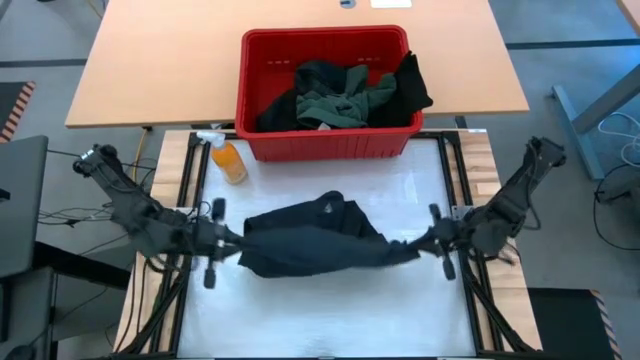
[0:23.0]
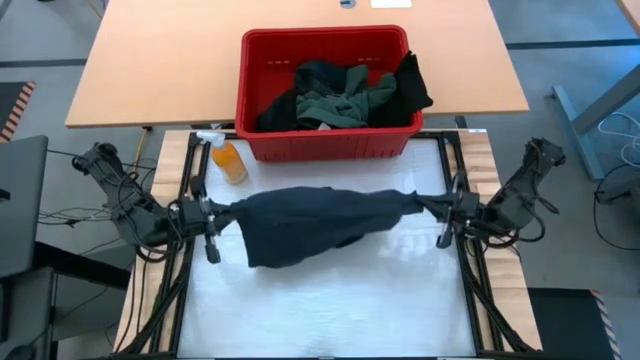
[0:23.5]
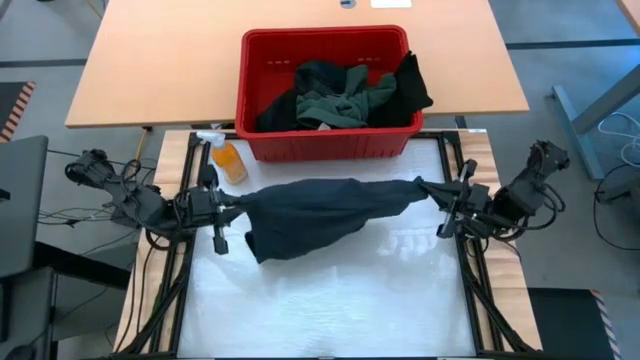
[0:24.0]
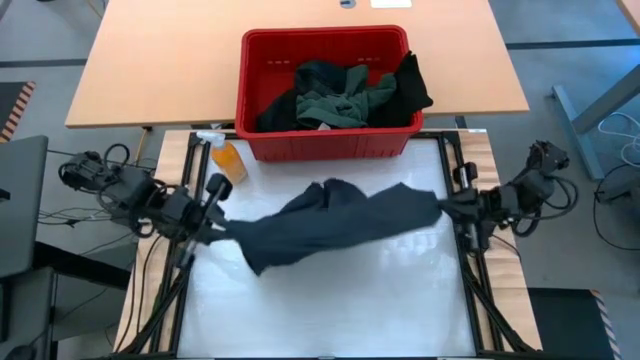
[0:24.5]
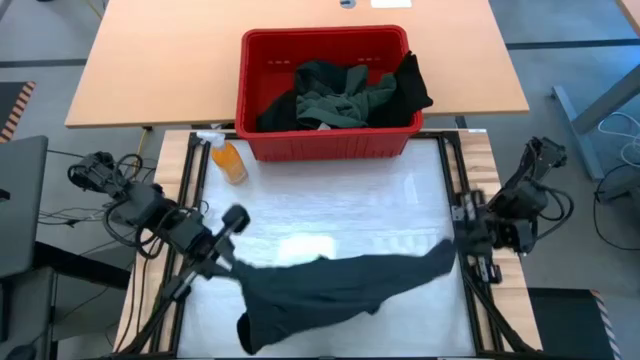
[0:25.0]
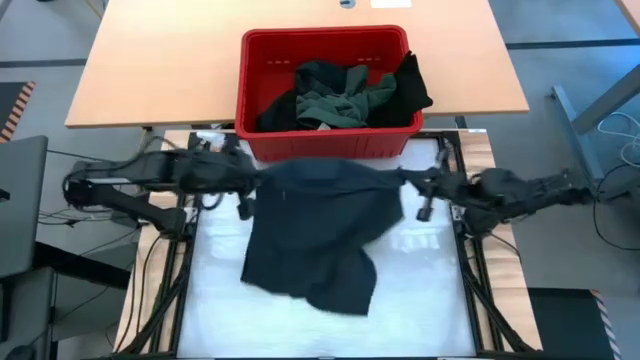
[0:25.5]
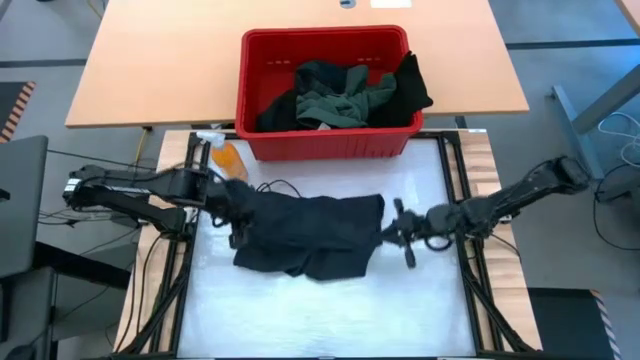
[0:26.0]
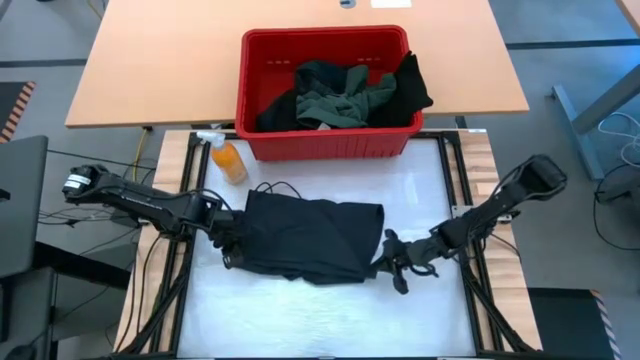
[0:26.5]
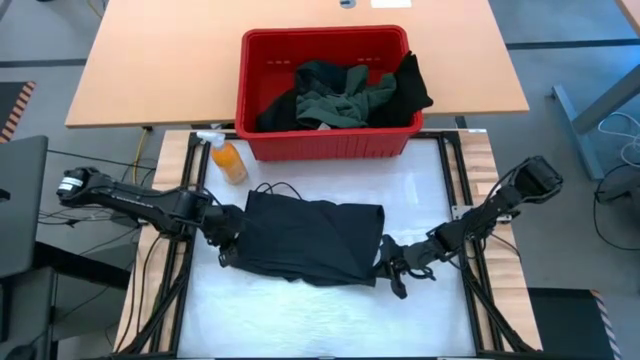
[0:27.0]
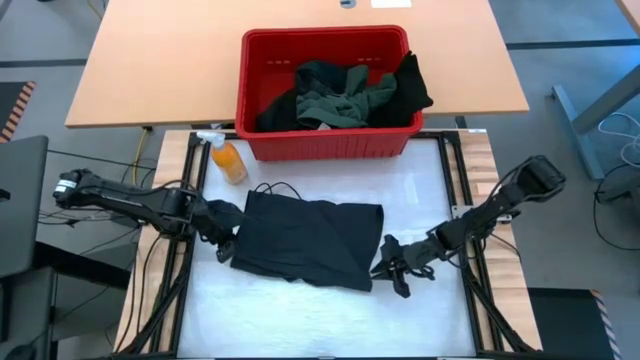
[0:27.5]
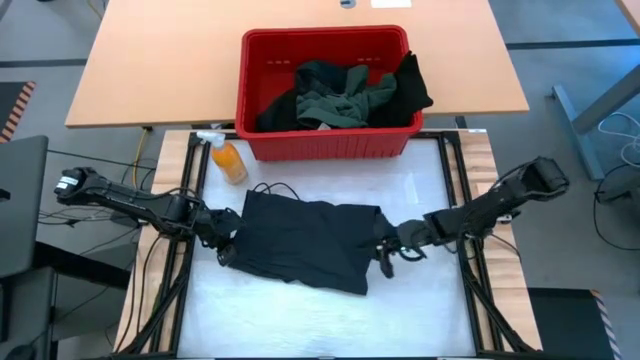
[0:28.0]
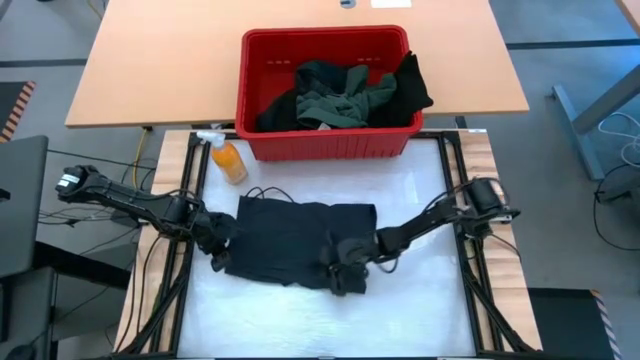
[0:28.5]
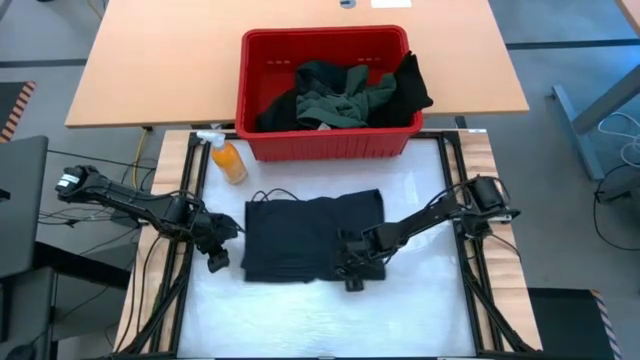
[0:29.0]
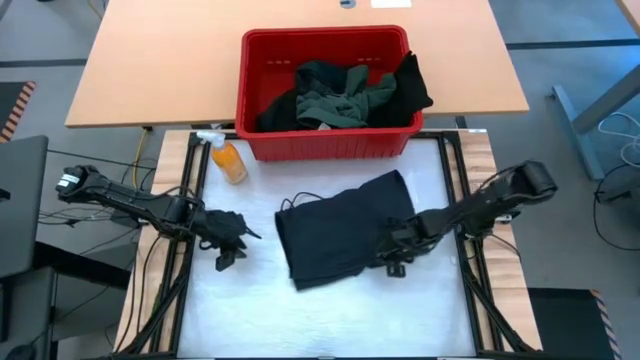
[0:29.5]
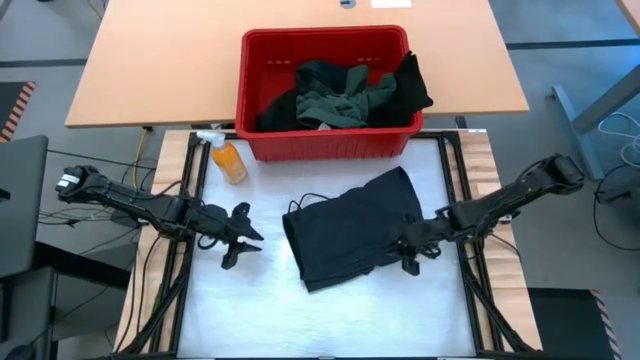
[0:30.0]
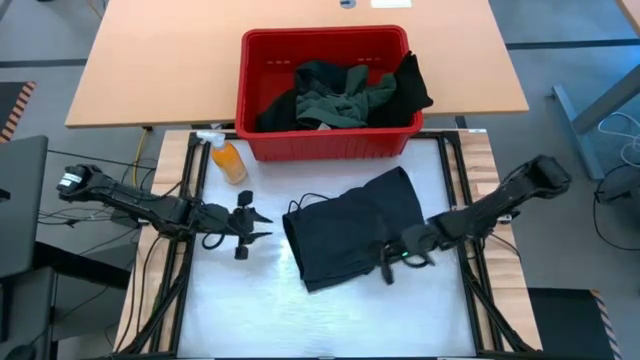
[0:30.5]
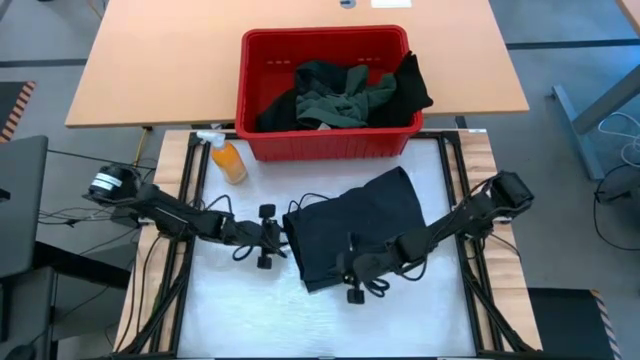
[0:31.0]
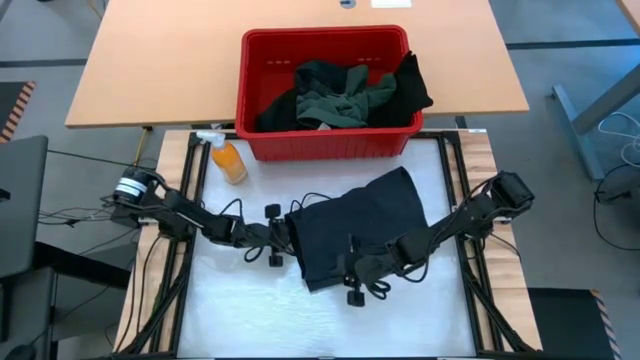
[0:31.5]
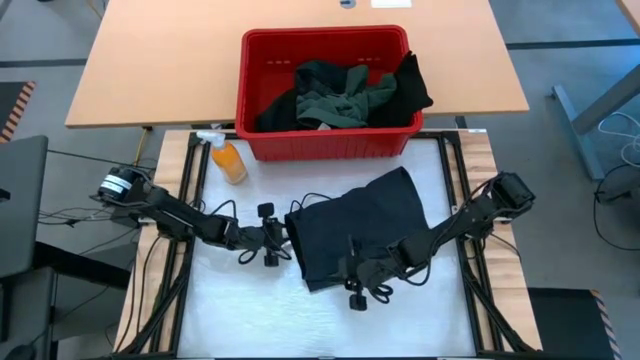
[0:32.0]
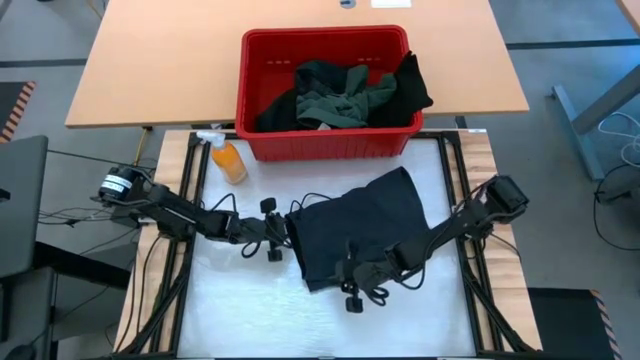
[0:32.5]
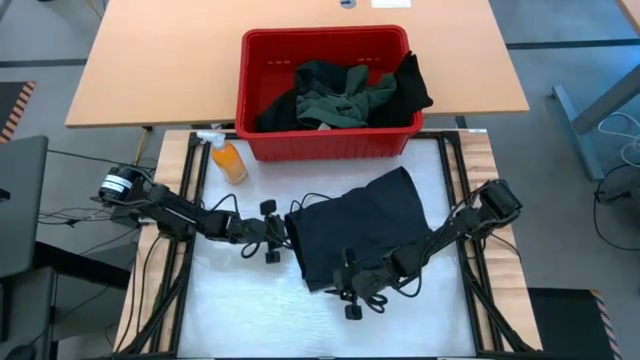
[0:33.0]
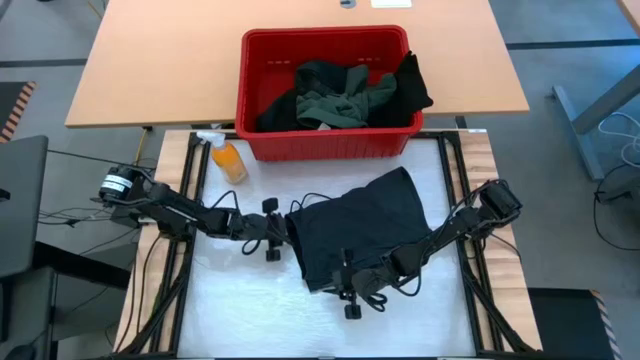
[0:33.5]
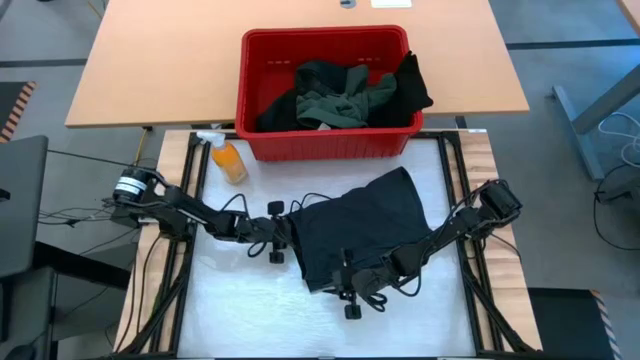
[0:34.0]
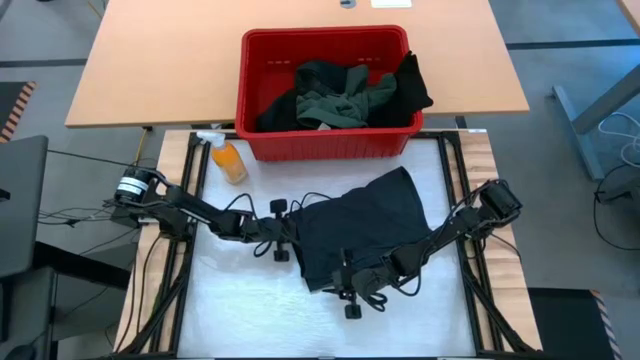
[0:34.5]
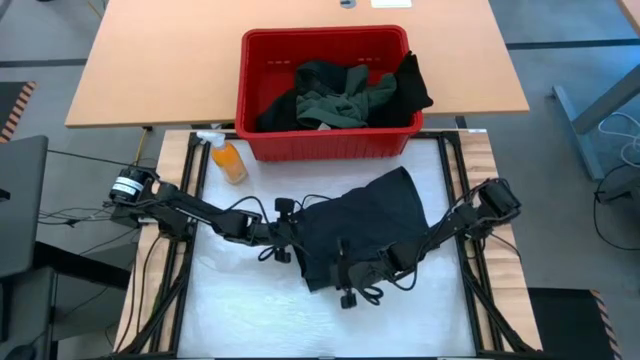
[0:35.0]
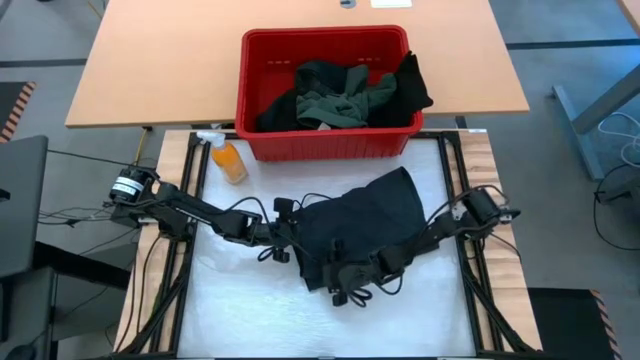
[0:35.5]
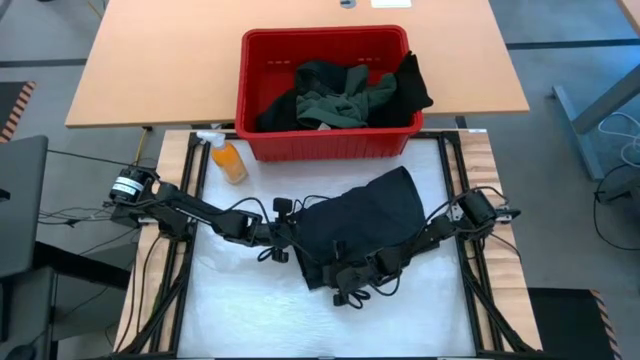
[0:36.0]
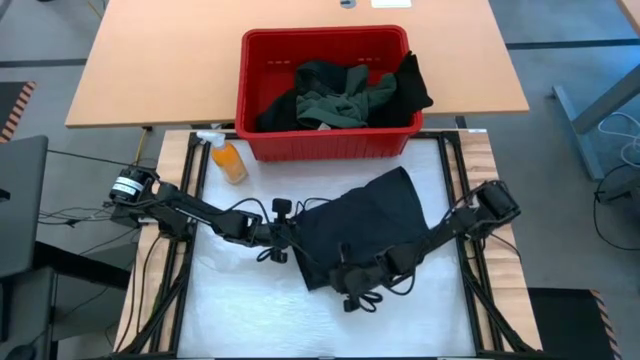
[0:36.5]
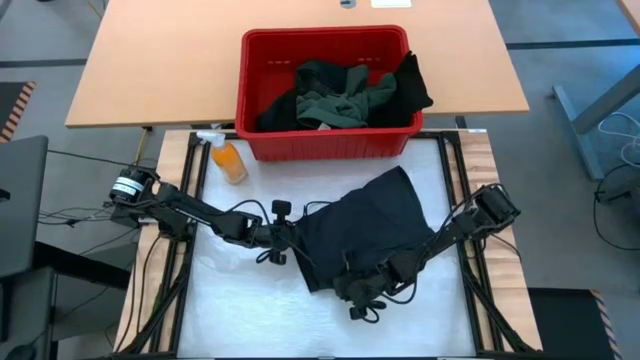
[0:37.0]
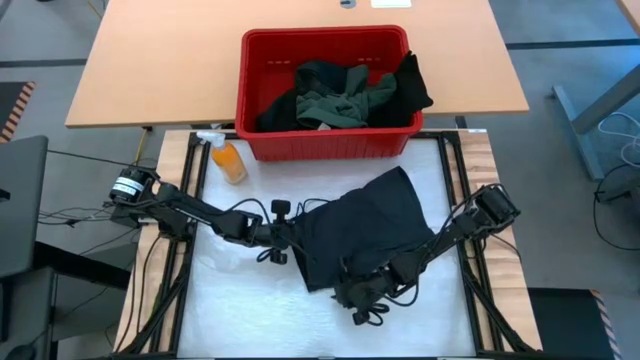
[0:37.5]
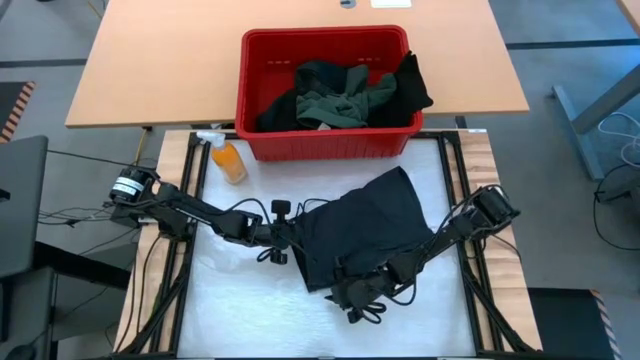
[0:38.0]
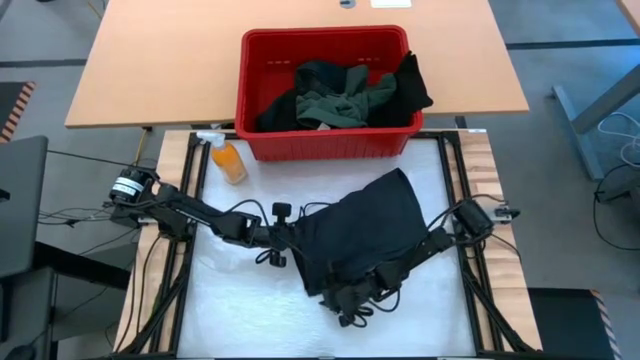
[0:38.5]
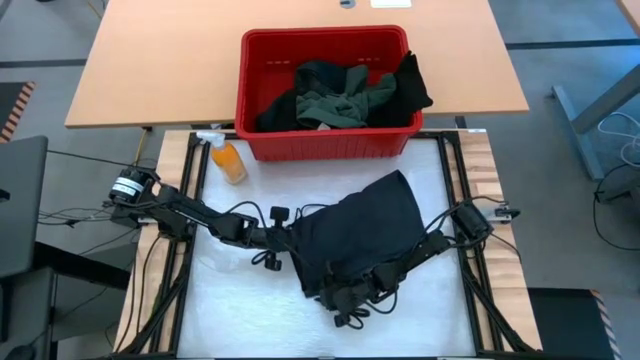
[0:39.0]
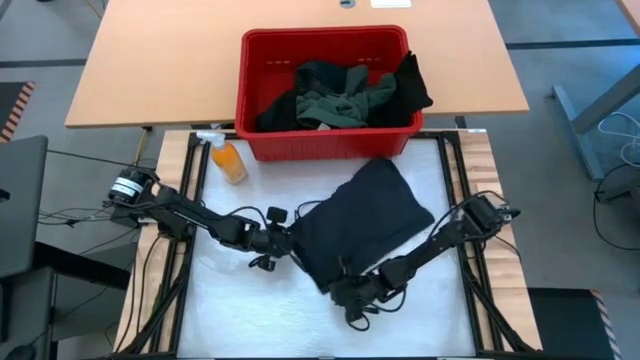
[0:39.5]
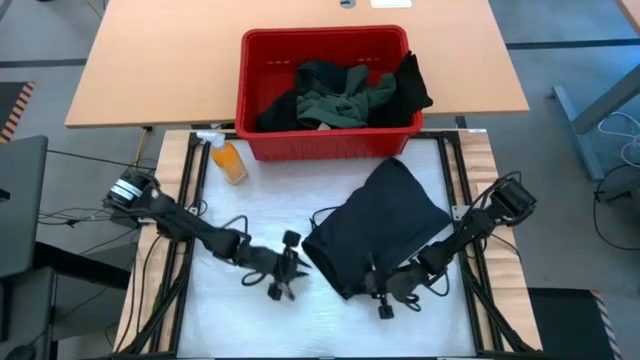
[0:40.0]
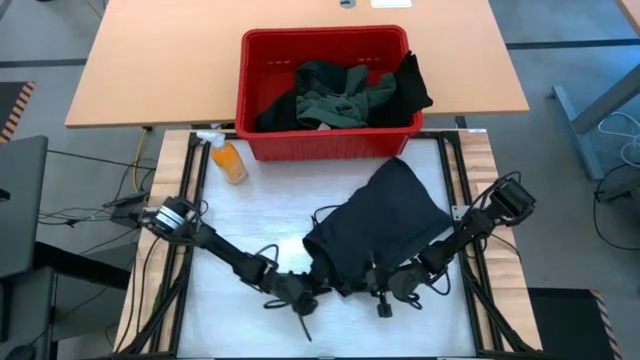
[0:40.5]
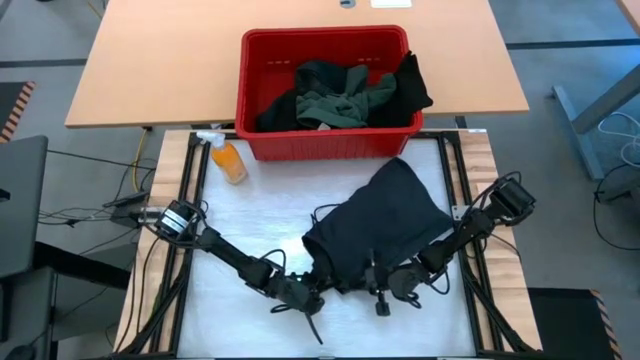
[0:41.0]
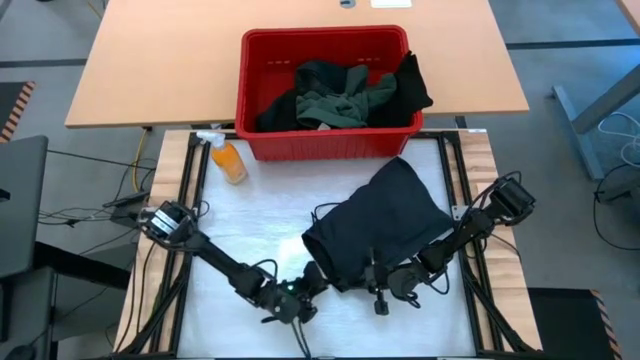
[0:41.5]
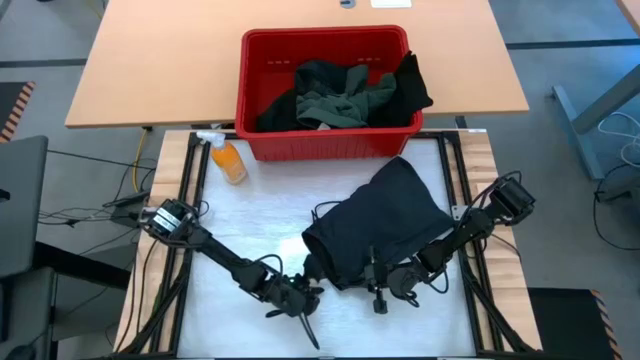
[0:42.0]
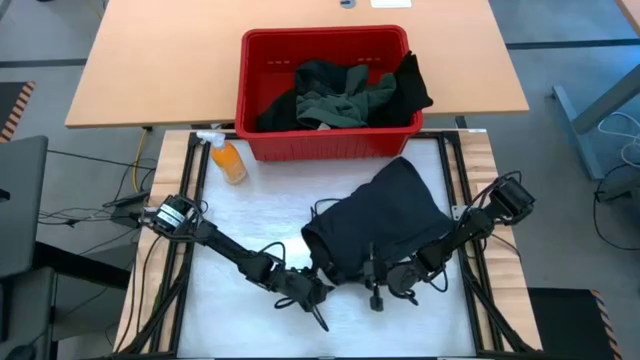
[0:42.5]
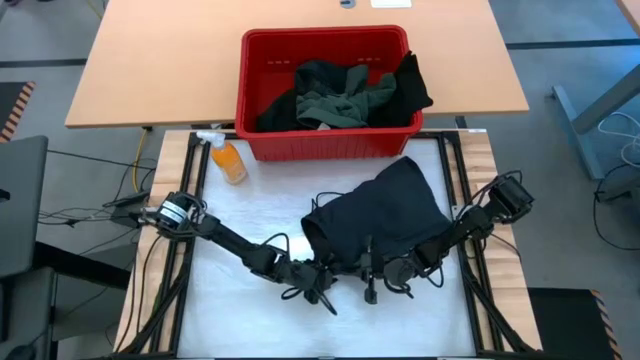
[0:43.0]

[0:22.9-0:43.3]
Task: Fold laundry
Fold the black shorts
